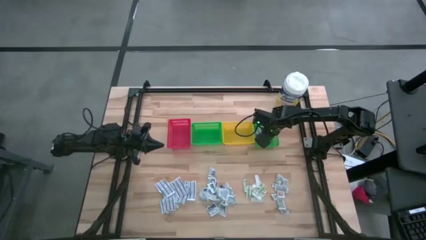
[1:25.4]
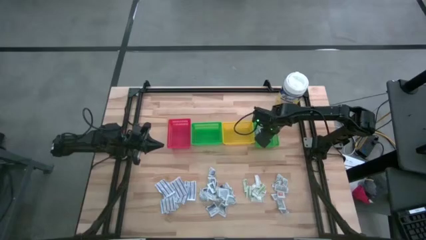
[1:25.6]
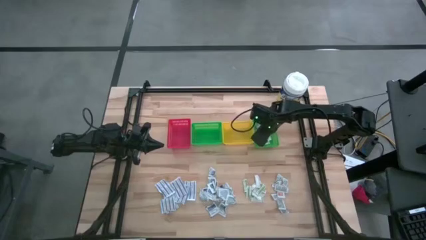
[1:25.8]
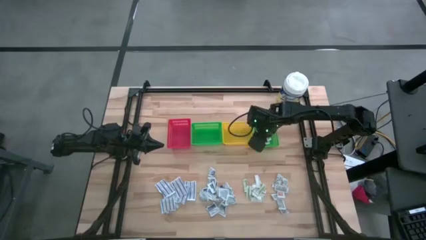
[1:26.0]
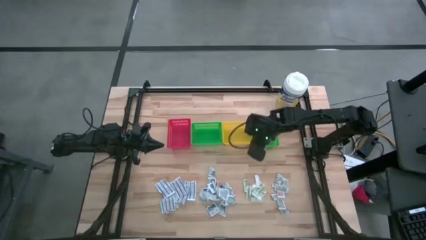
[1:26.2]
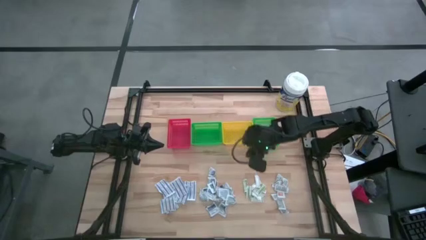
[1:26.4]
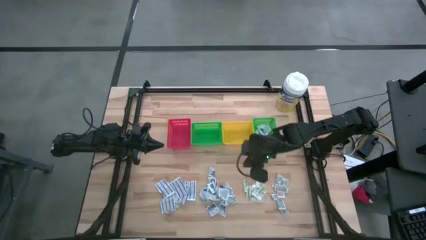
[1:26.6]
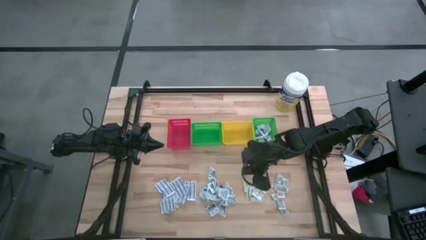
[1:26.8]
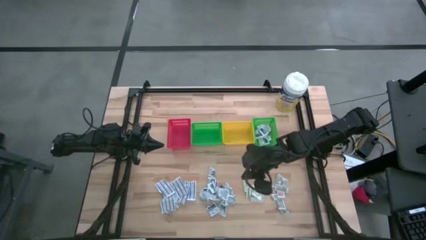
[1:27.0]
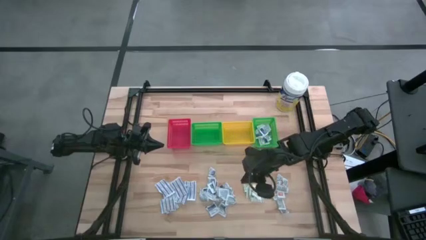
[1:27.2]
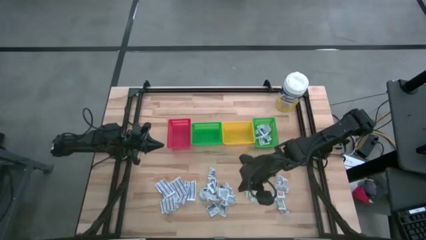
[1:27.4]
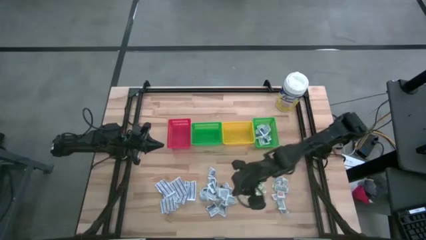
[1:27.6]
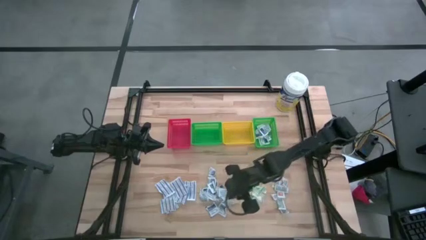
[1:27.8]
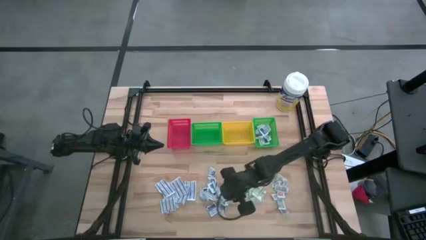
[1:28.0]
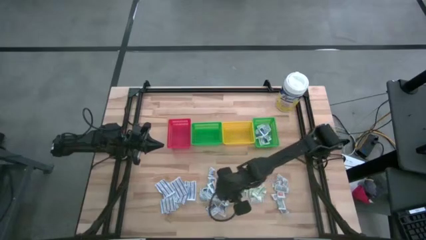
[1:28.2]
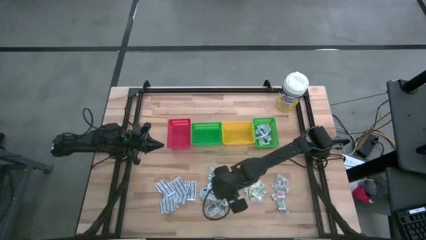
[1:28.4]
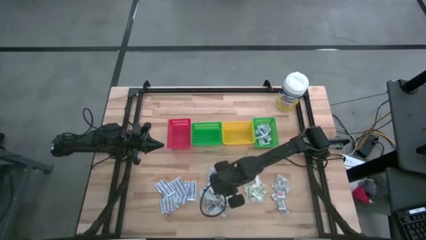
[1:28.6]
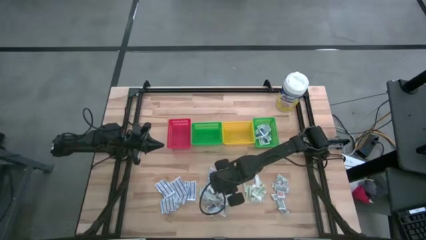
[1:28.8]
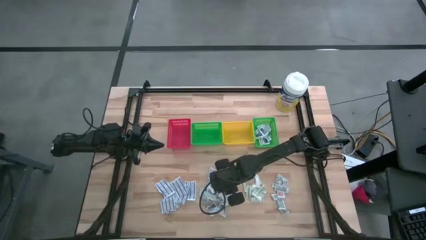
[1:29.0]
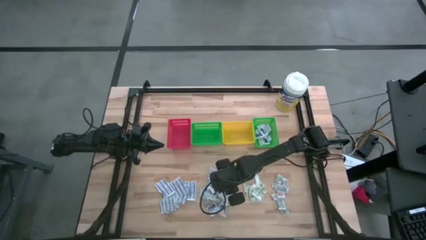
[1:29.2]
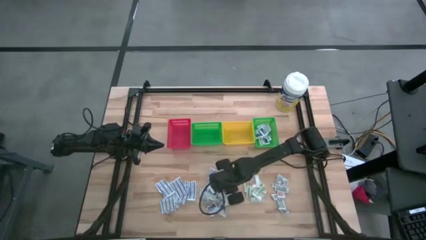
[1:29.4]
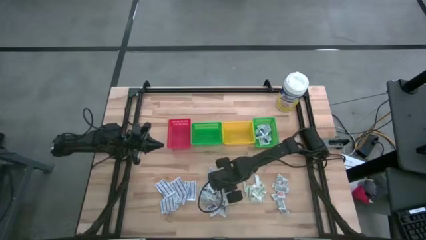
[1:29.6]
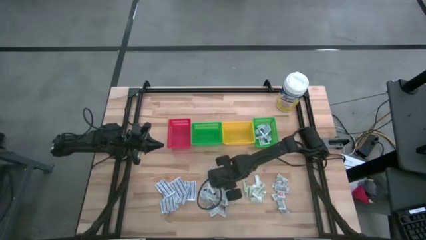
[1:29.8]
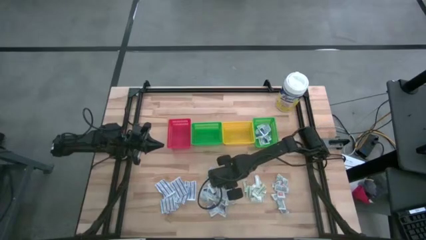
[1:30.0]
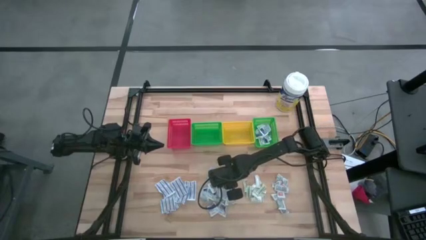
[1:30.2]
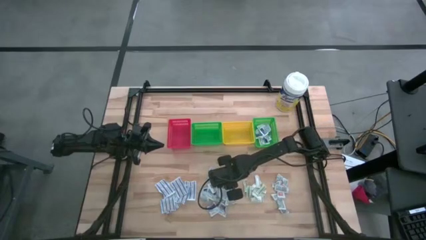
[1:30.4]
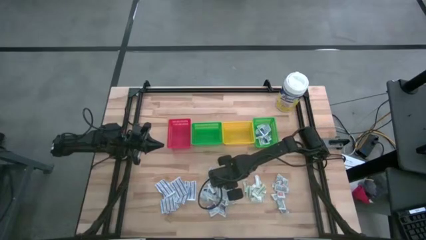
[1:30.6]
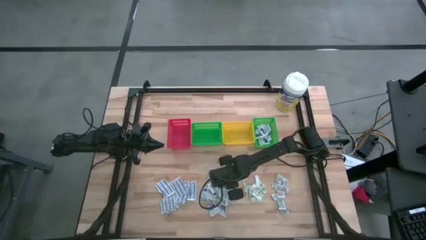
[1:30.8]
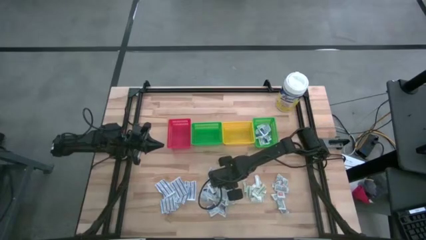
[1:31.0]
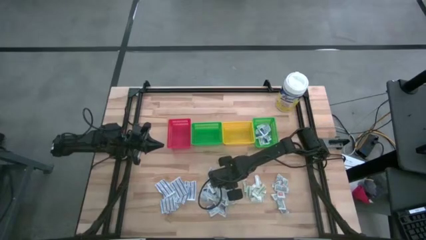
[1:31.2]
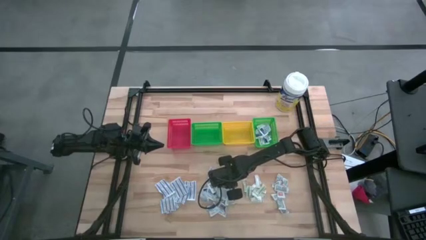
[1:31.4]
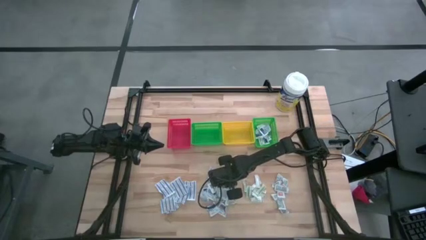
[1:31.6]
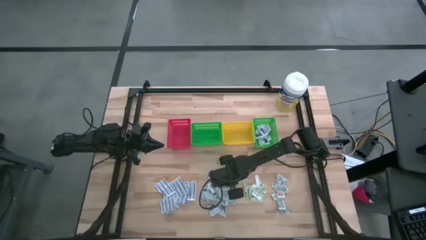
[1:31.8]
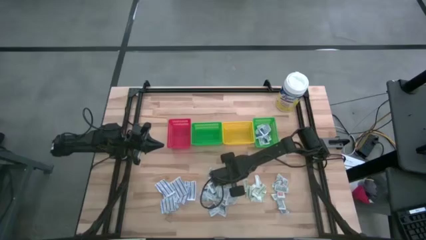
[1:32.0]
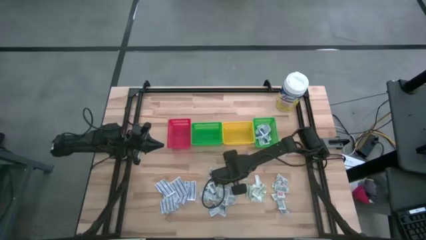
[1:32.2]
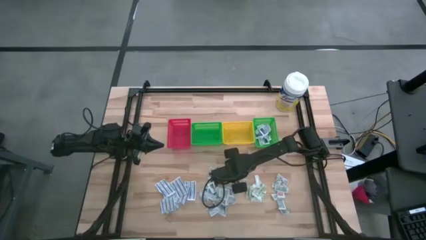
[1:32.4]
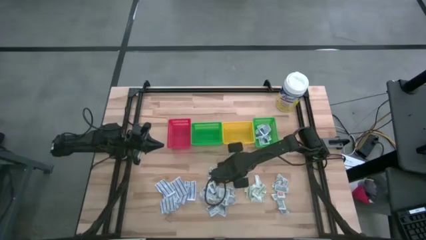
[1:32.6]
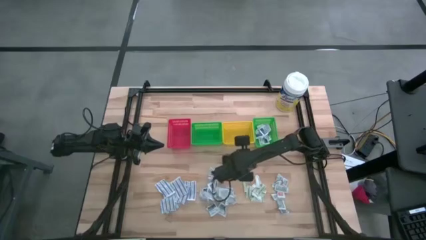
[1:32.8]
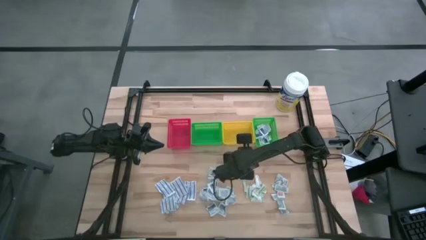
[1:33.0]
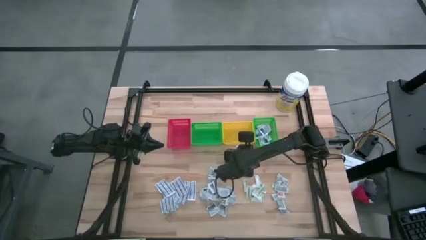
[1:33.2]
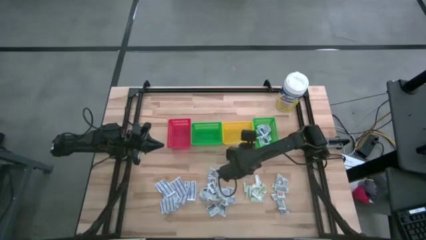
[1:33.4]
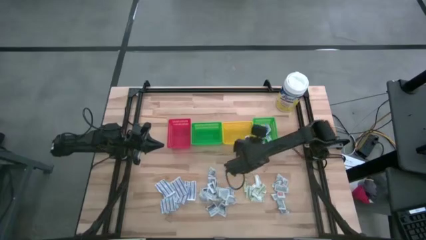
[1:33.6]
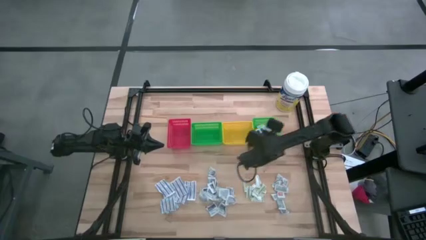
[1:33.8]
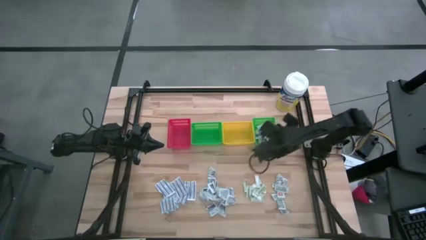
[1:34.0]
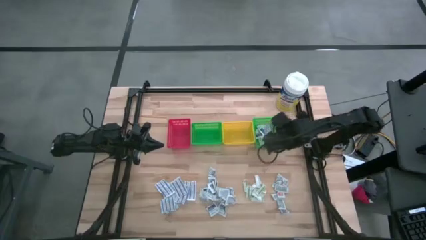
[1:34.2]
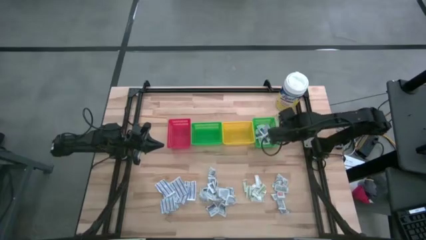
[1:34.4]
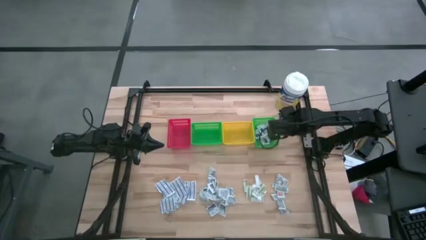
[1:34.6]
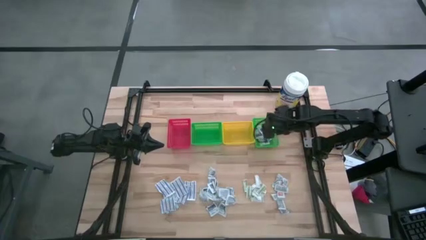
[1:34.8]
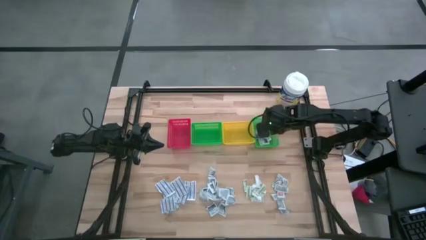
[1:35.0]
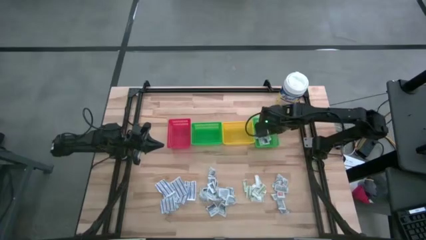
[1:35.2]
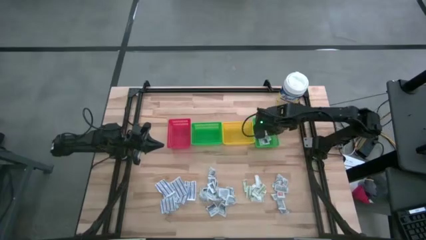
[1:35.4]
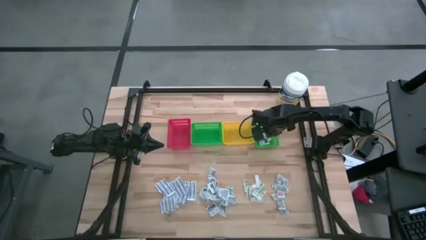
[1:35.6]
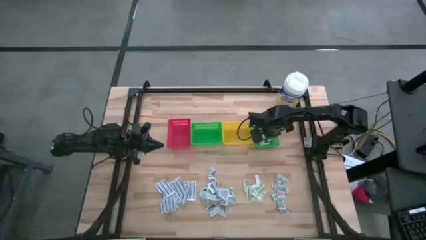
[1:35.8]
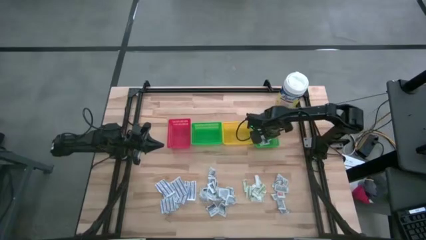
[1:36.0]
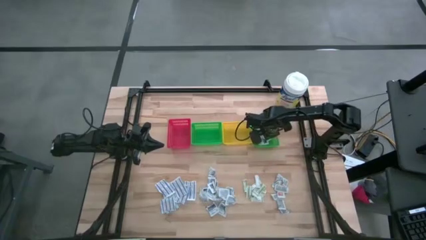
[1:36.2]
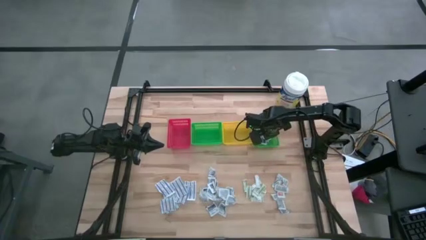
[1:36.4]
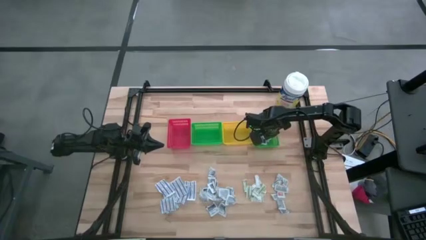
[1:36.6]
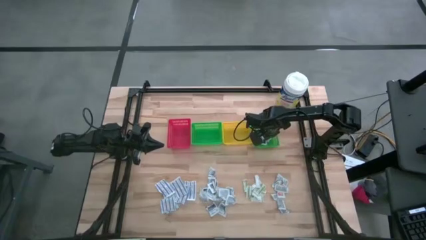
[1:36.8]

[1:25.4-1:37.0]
Task: Pick & Place First Aid Supplies
Put the blue alcohol pad into the right green bin
